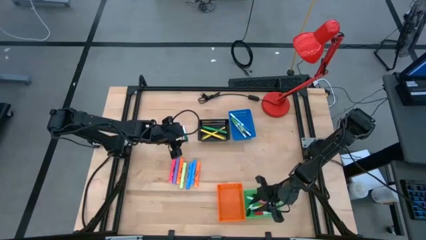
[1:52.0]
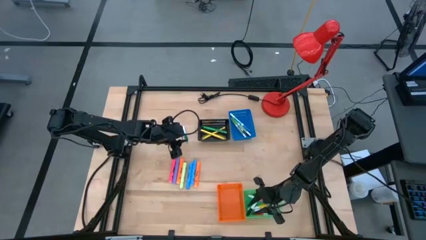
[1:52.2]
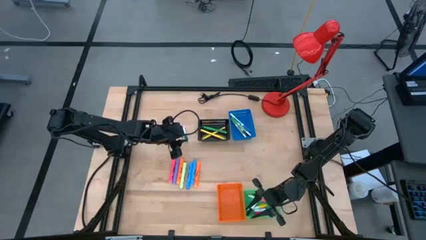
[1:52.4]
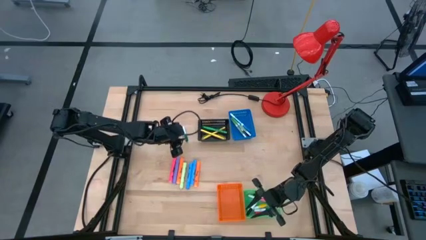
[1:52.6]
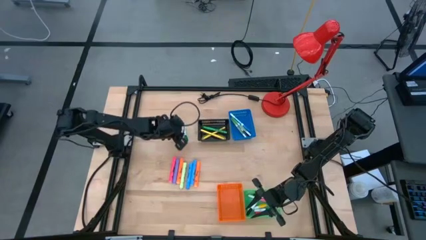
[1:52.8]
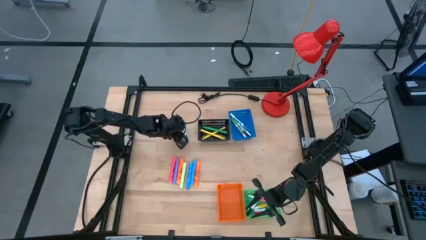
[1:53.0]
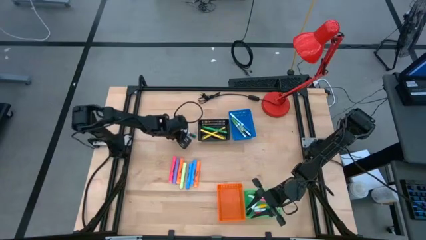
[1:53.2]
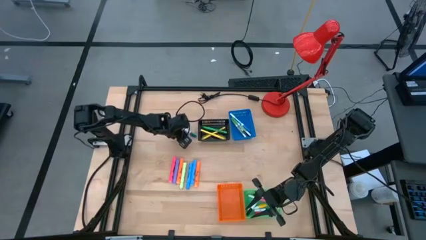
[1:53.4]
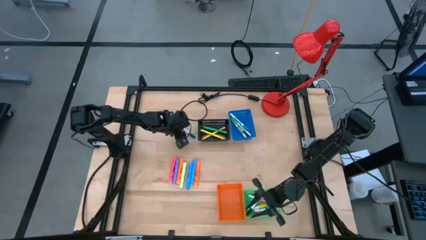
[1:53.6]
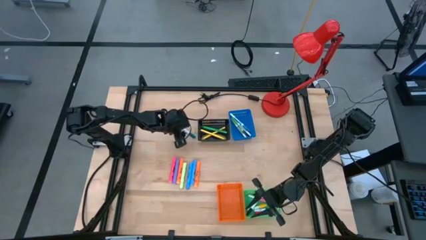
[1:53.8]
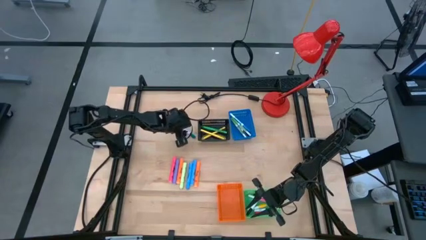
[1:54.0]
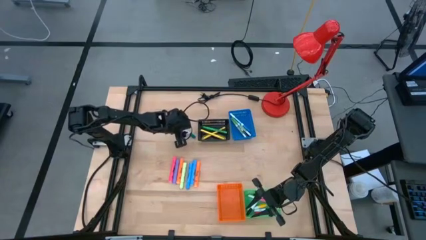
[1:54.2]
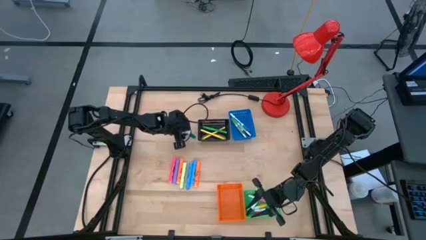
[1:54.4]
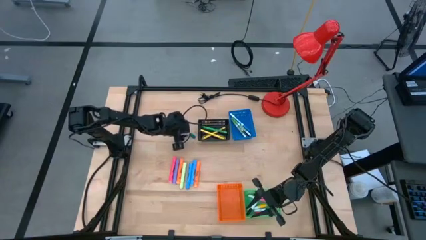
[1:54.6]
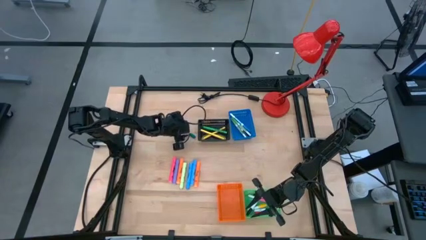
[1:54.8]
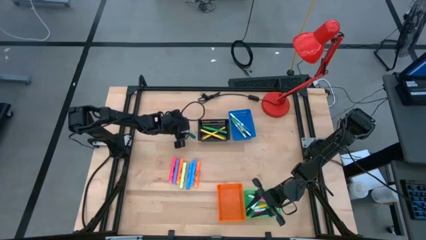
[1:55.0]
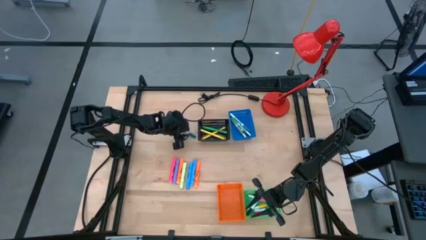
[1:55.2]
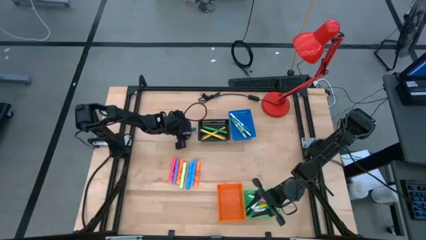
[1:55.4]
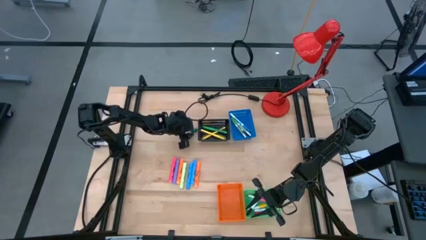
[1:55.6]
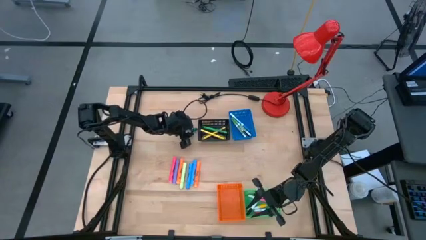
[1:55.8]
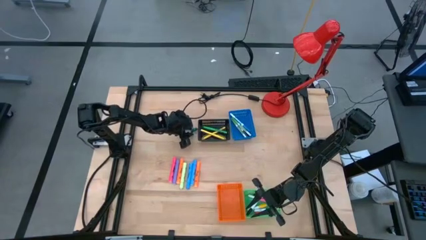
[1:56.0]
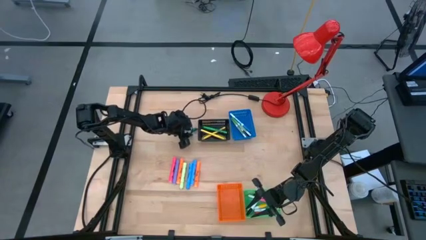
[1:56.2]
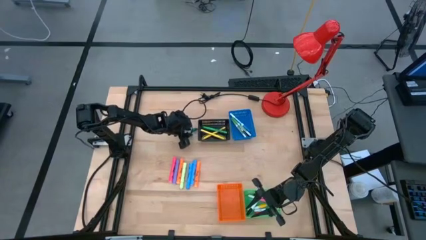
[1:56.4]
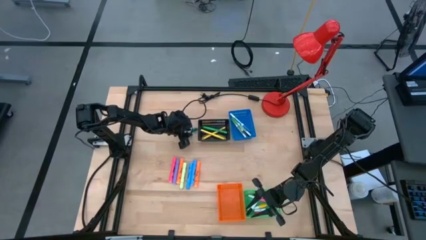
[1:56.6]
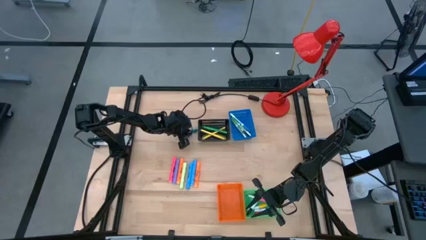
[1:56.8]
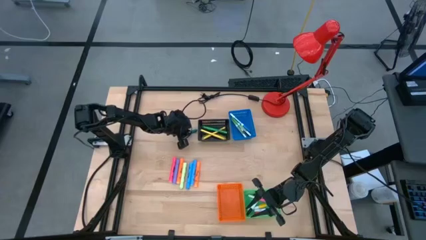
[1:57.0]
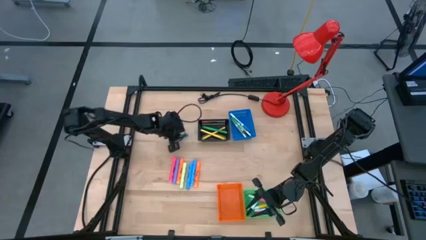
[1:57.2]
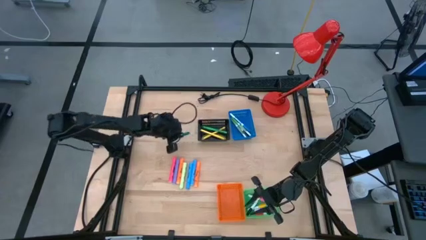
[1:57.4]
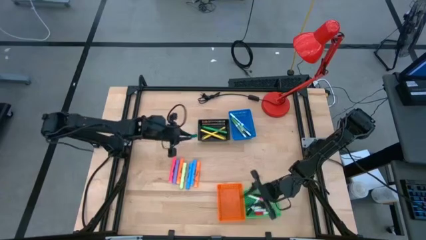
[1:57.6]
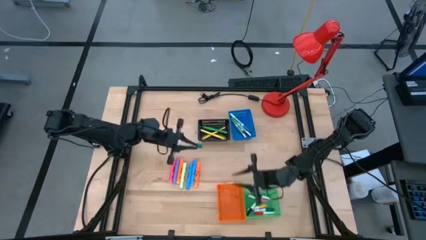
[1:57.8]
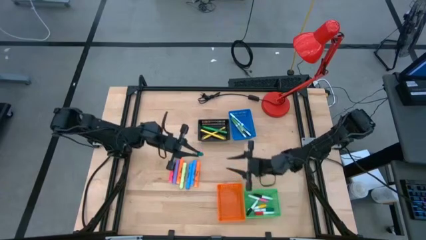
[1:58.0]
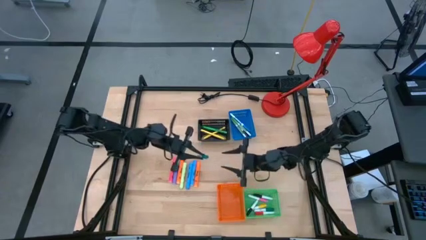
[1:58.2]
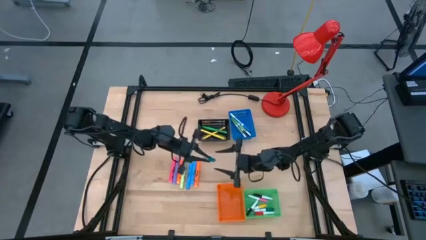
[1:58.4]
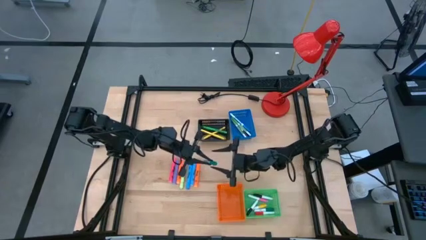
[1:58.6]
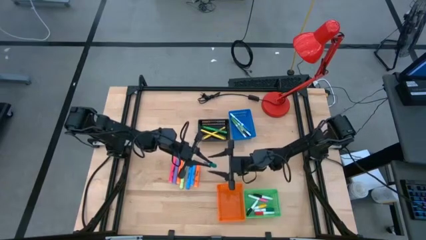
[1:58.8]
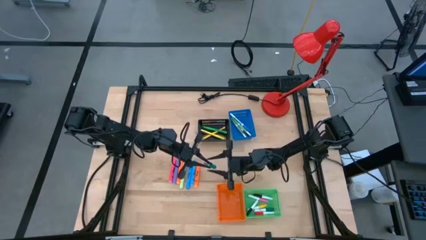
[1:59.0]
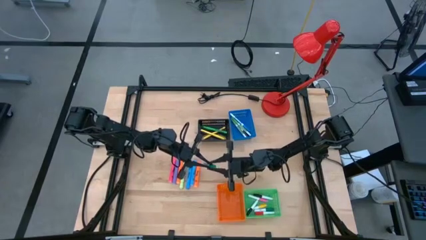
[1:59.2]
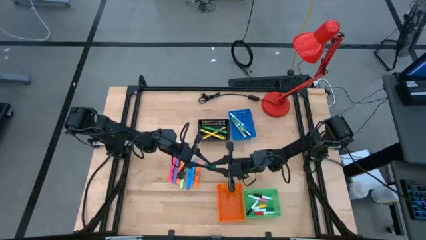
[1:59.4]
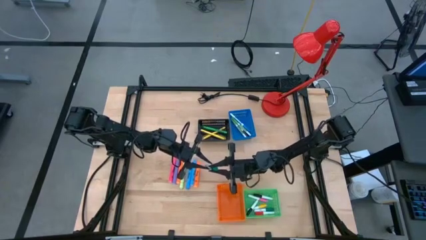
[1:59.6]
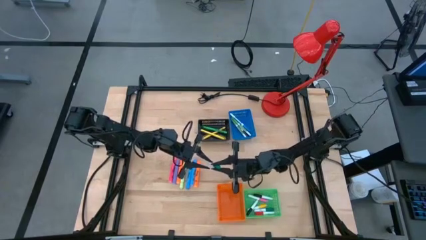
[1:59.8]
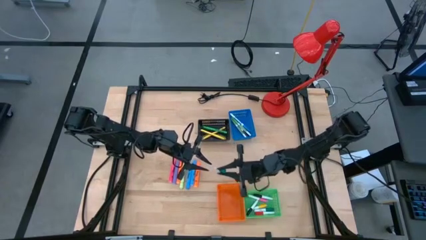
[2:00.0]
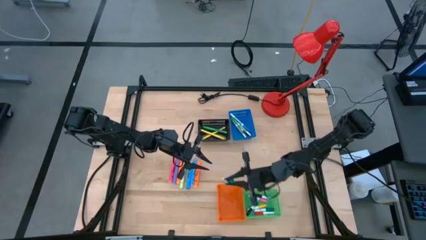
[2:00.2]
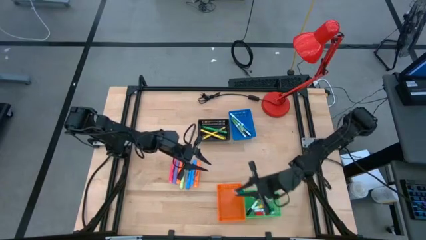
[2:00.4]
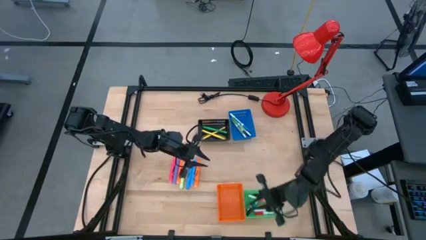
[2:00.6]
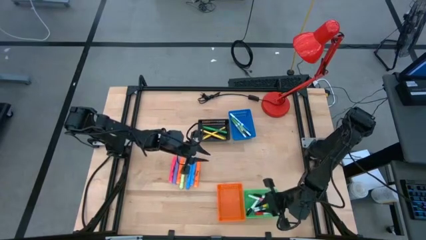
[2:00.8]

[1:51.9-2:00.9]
Task: Pick & Place Markers
Put the green highlighter pen into the green bin

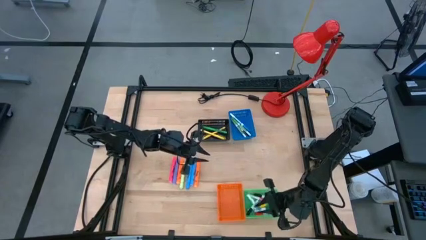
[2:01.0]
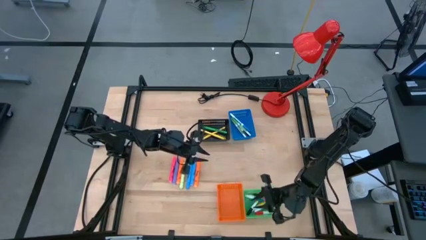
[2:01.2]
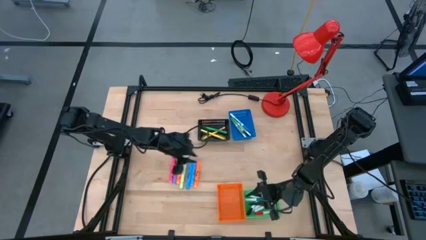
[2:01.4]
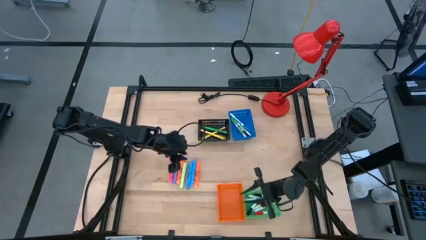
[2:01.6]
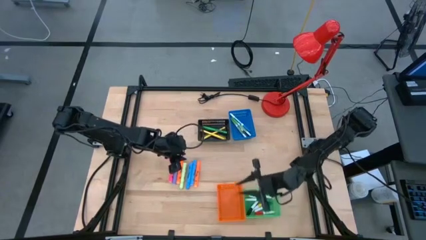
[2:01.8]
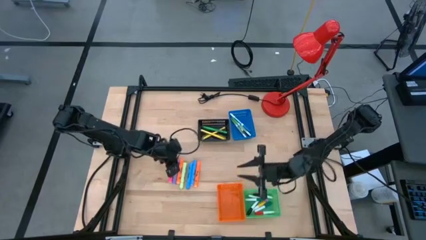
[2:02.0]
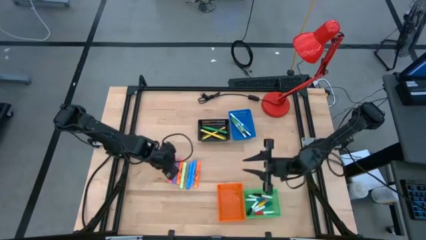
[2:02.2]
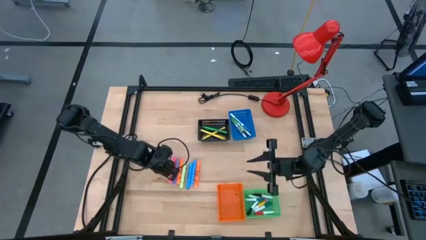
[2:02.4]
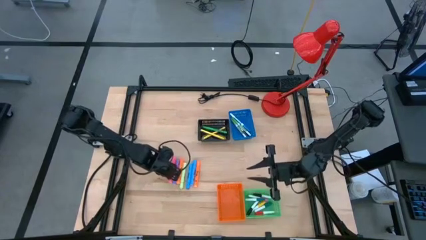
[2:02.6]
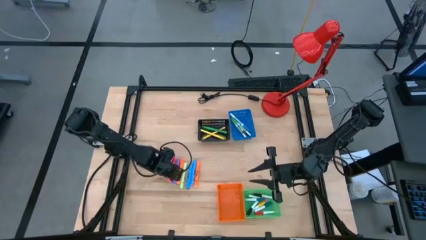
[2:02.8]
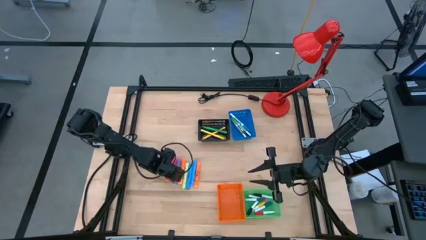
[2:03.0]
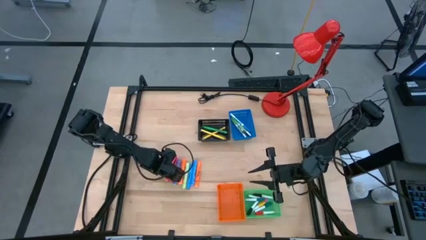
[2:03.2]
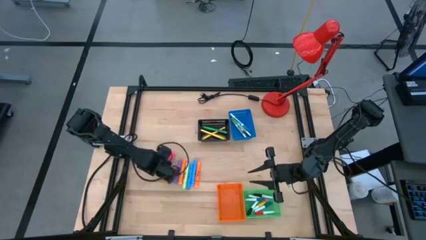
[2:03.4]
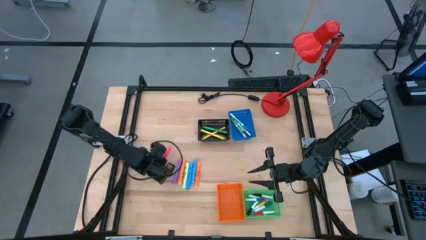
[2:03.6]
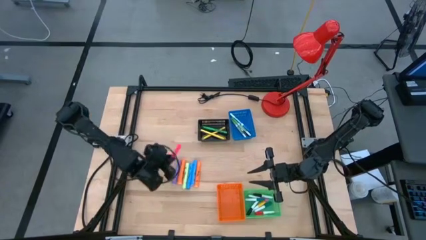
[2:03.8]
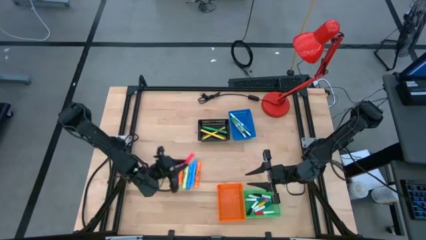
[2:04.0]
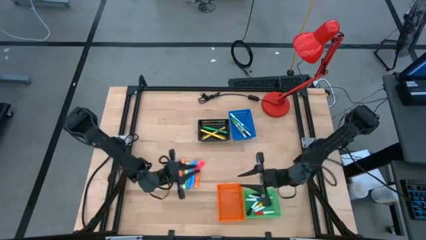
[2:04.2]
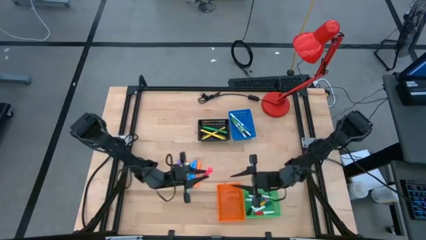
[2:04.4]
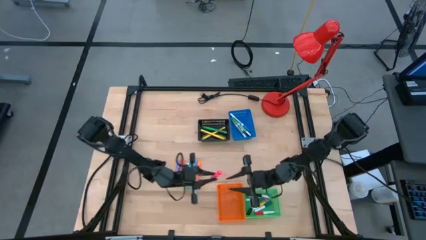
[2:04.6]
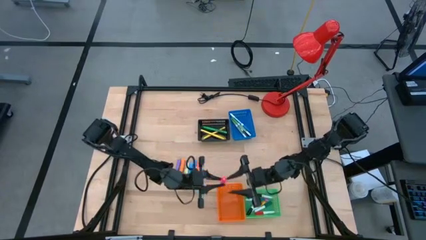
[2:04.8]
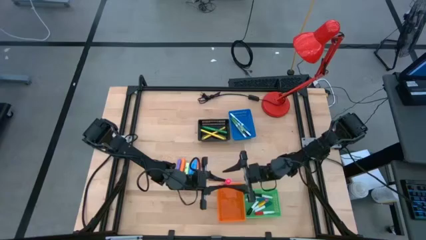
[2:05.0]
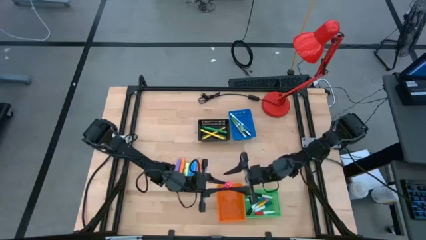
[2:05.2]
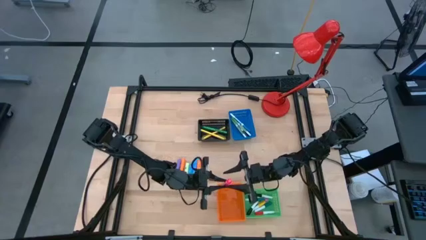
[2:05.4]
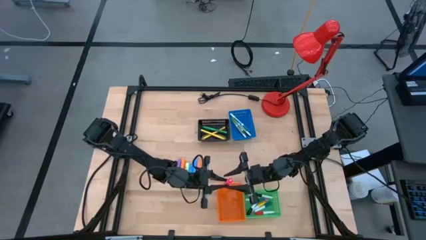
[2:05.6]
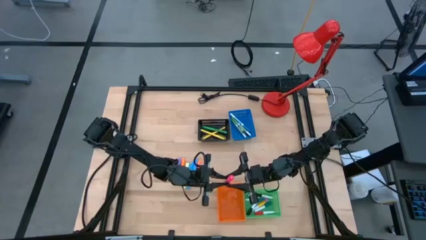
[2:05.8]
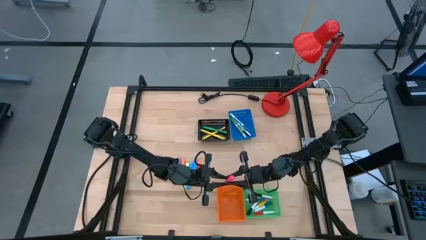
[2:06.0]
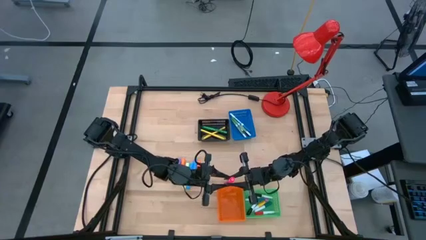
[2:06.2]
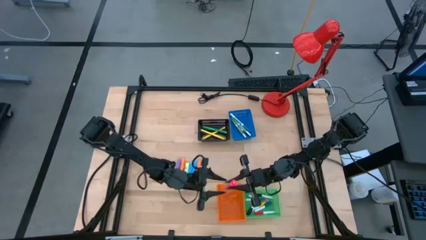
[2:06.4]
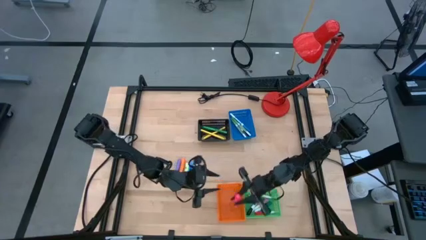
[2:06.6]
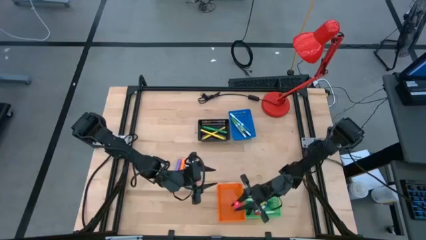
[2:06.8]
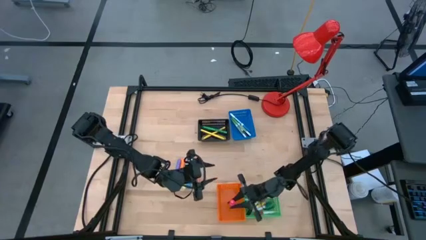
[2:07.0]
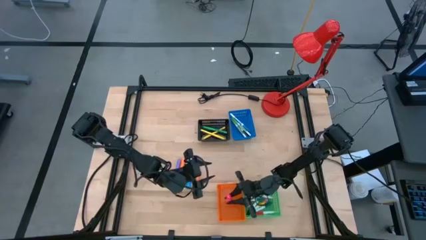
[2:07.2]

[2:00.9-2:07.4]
Put the pink highlighter pen into the orange bin

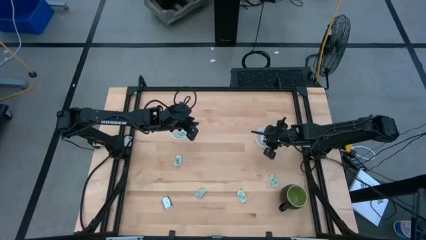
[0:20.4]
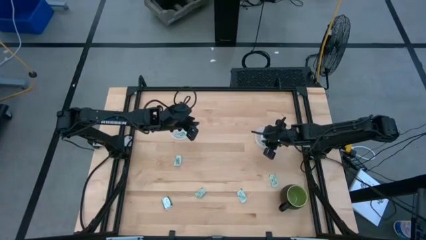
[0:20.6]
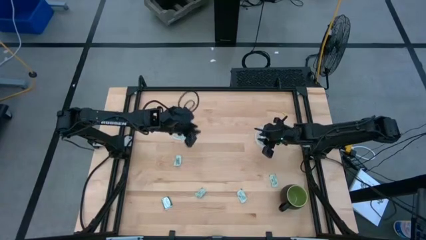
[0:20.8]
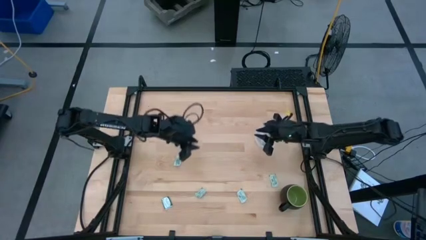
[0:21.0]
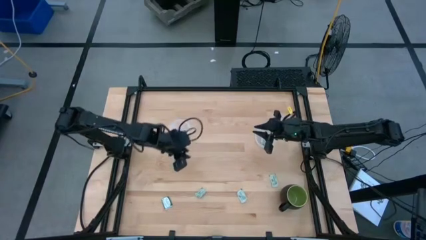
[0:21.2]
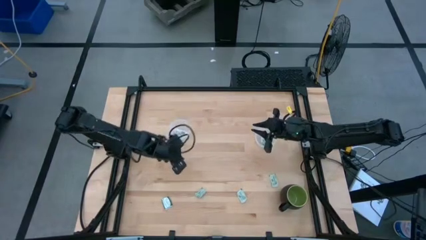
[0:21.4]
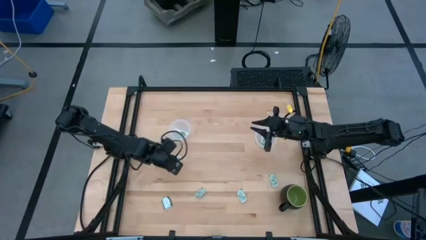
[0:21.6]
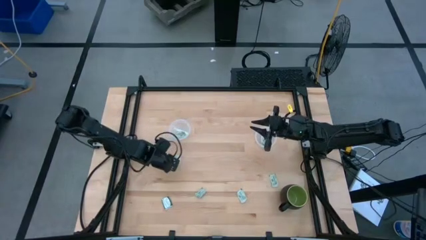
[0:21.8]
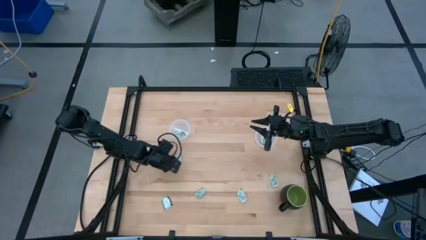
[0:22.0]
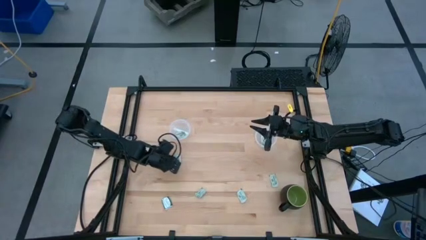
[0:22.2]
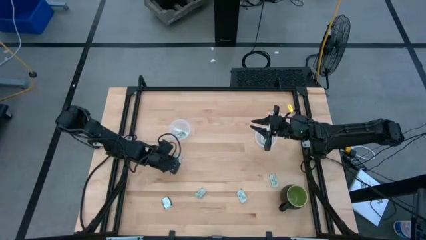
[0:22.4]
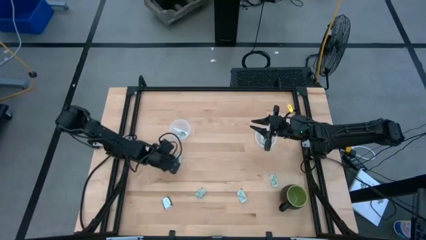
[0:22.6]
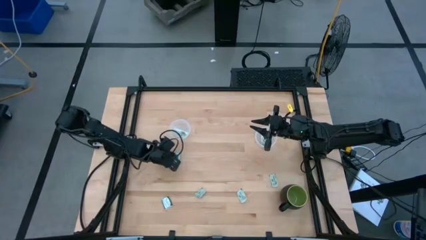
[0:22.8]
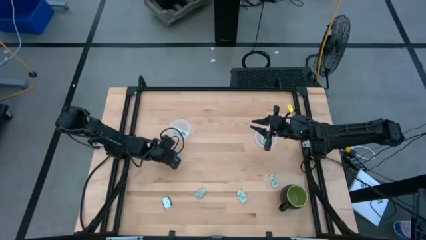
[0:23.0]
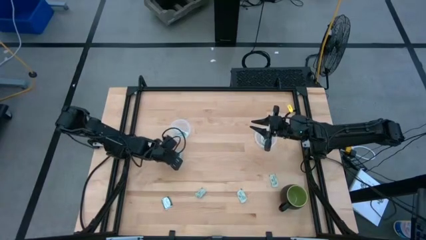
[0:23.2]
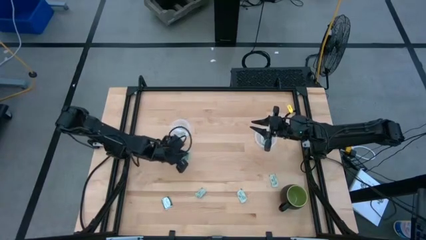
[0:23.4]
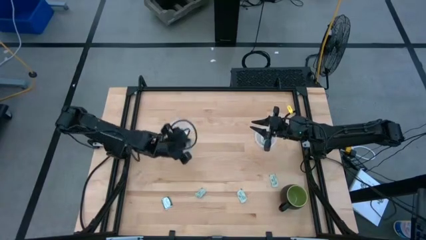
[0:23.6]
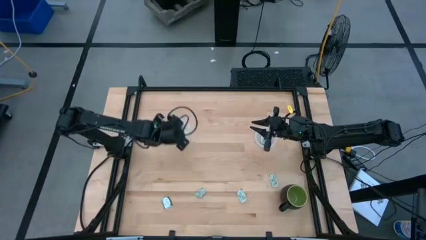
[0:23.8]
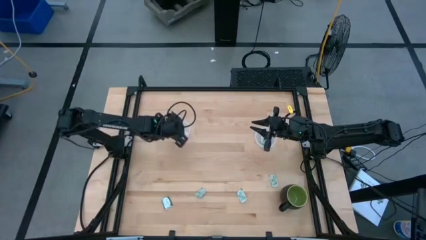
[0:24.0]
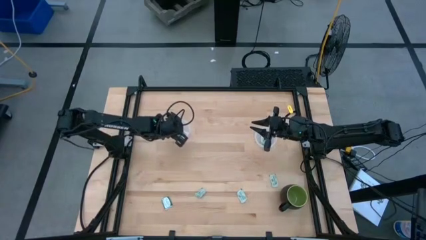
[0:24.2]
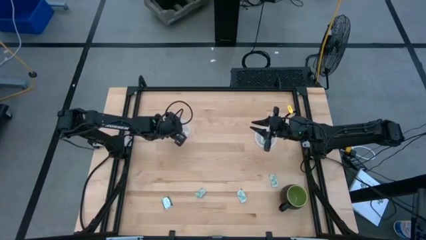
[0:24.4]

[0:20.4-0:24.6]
Task: Pick and place Stevia / Truvia into bins
Put the stevia packet into the left transparent container
